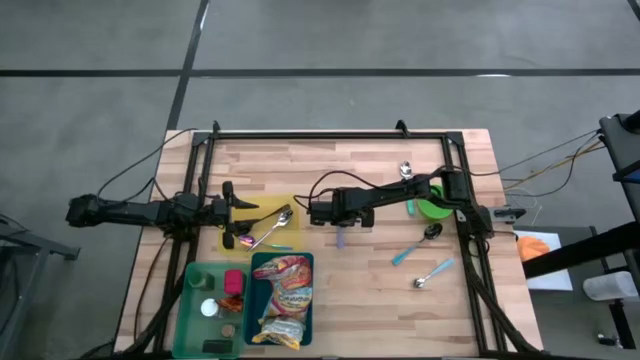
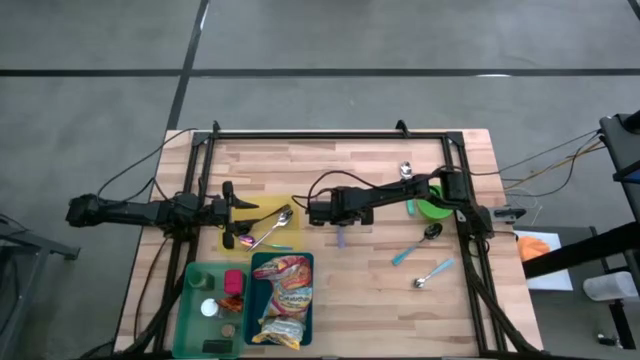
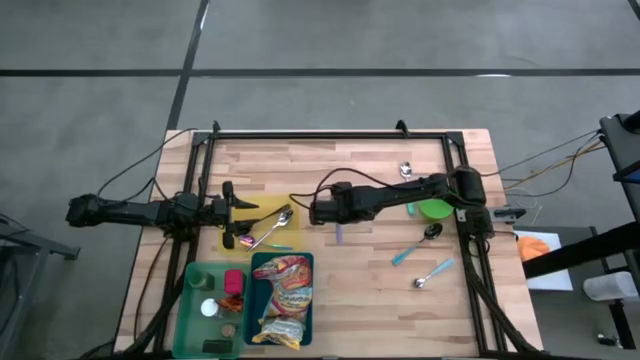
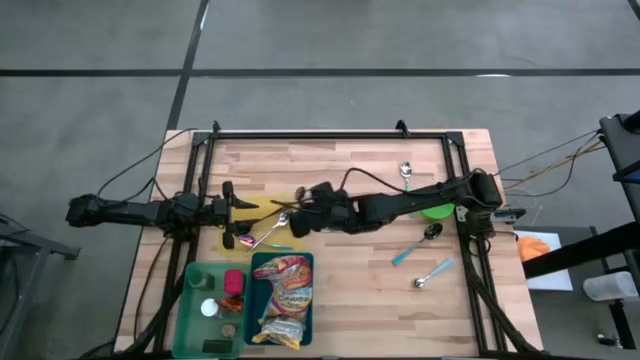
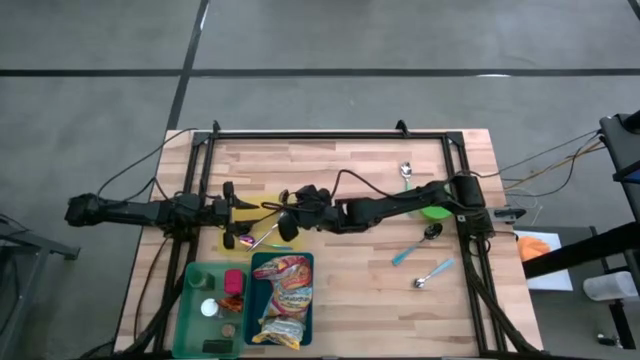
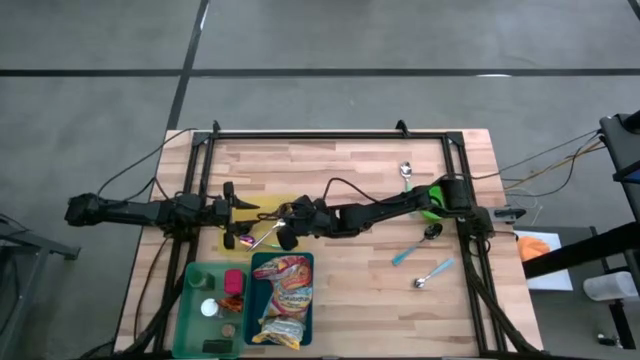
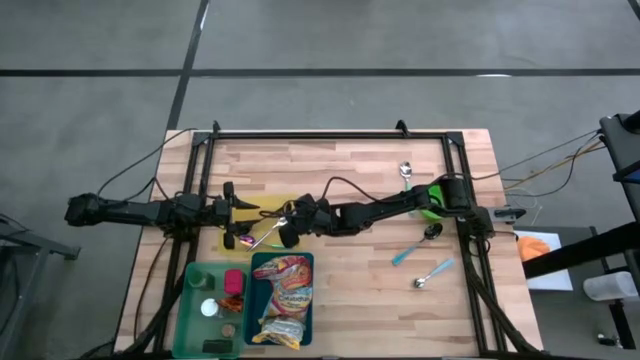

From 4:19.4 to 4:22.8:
Put the violet spoon into the yellow bin

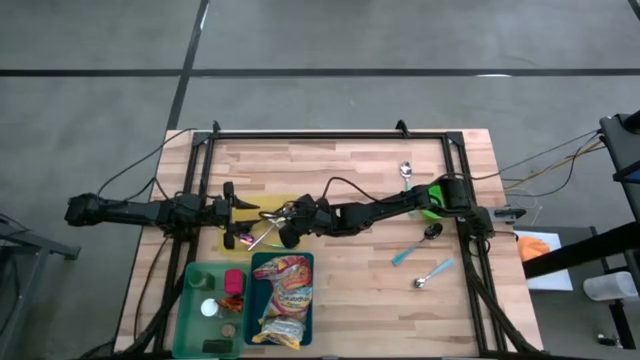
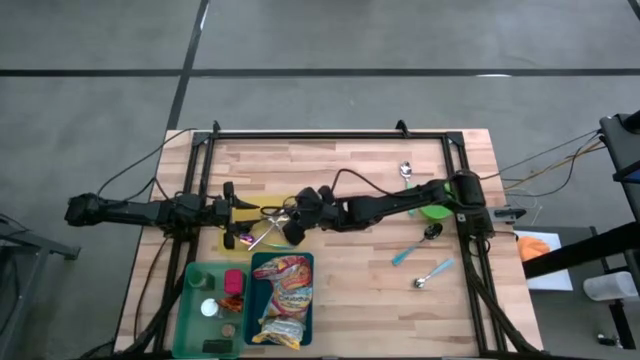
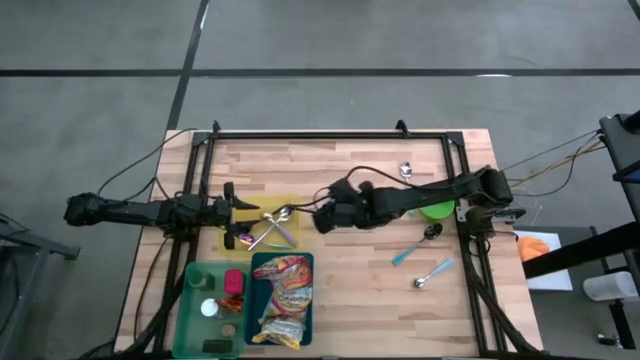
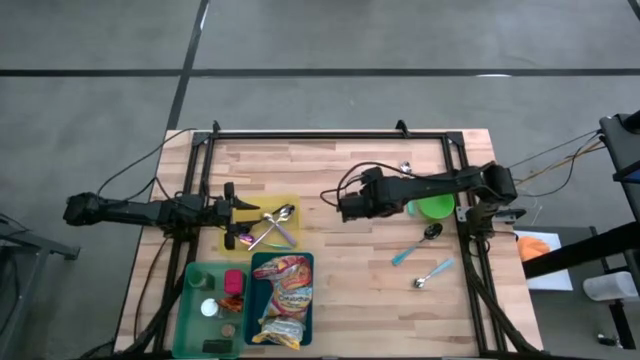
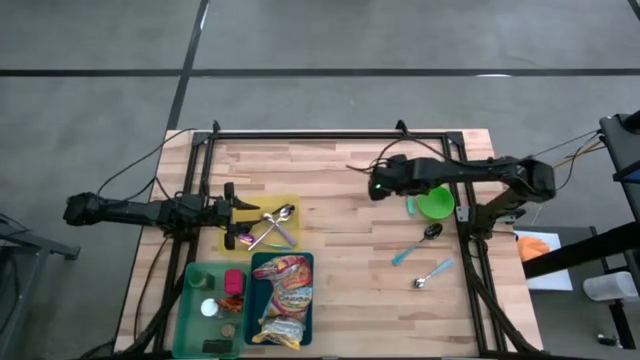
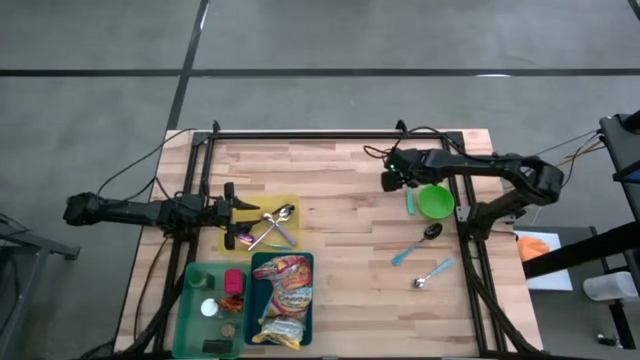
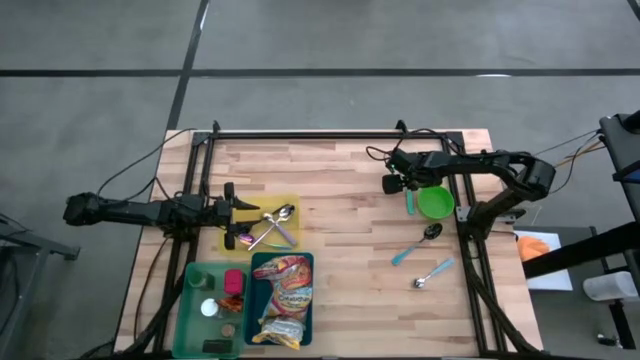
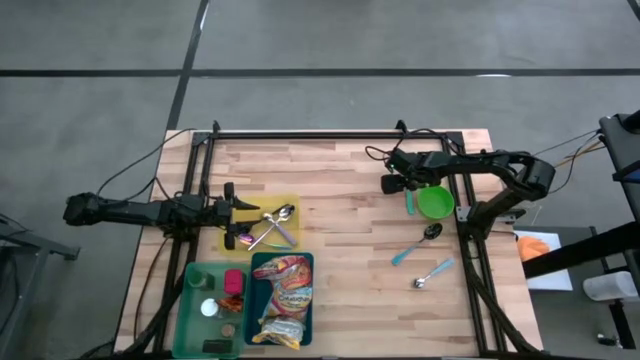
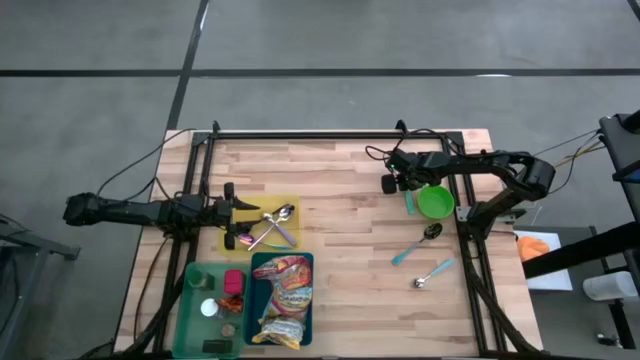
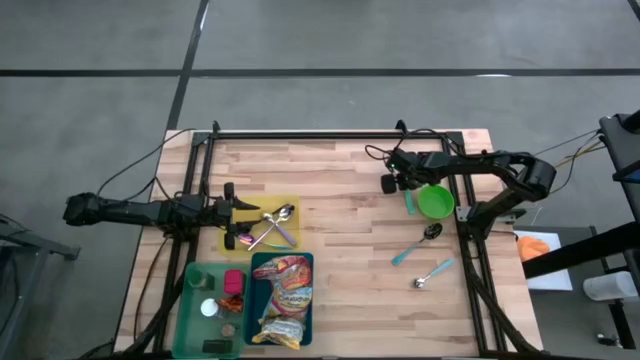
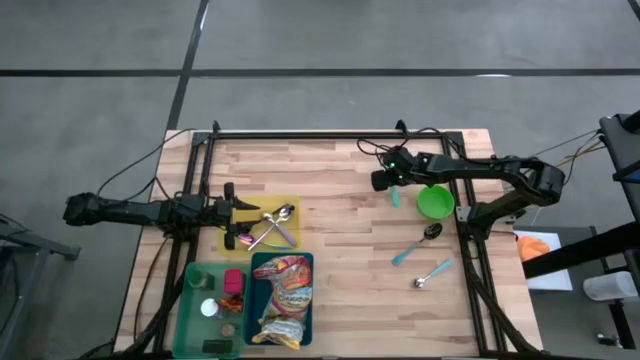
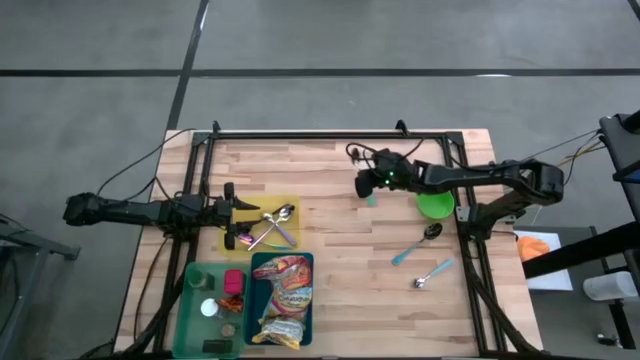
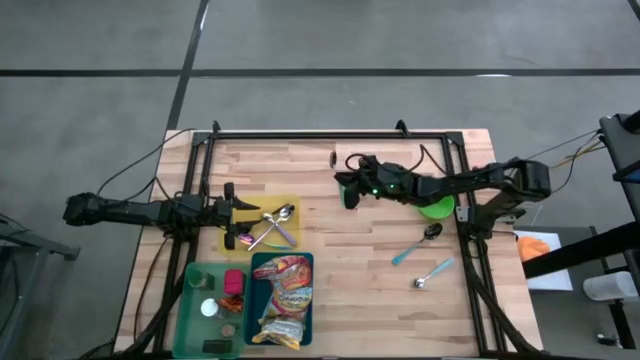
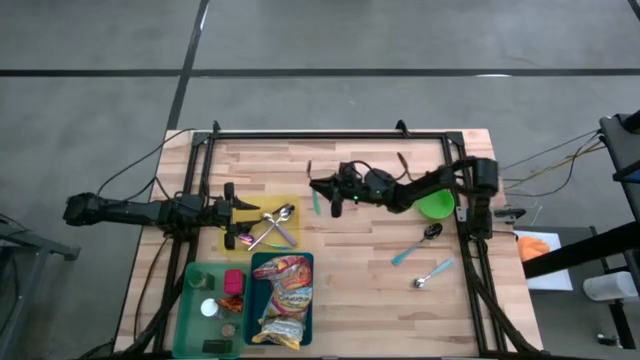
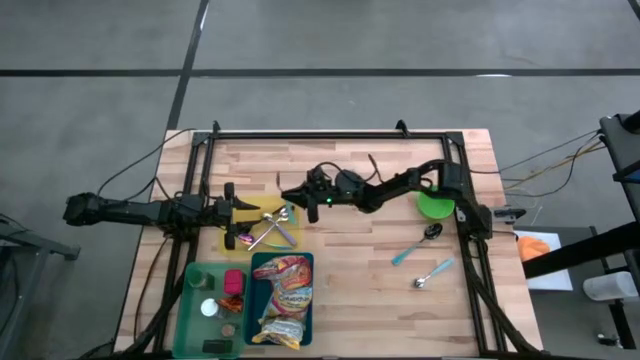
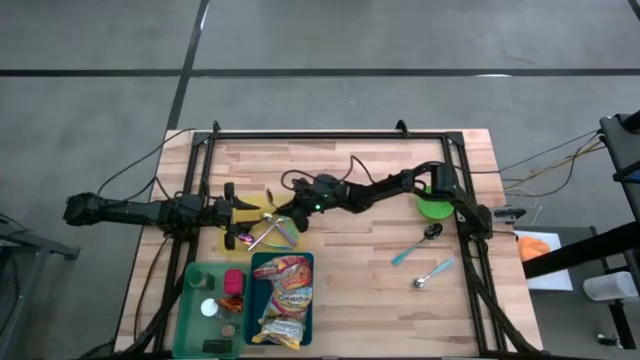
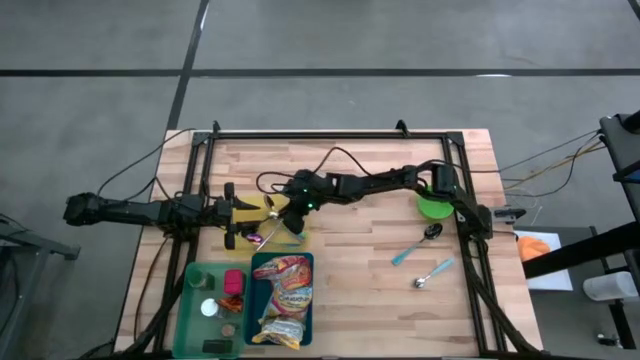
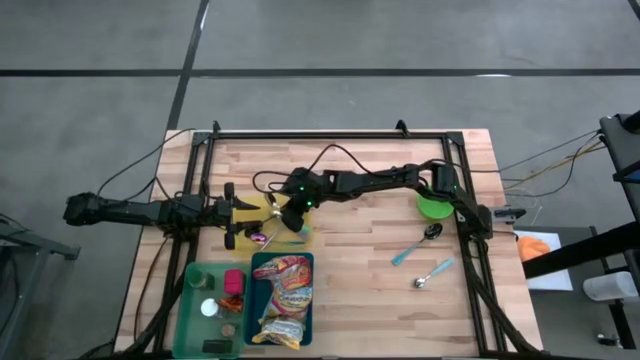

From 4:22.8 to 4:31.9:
Put the top light blue spoon into the yellow bin

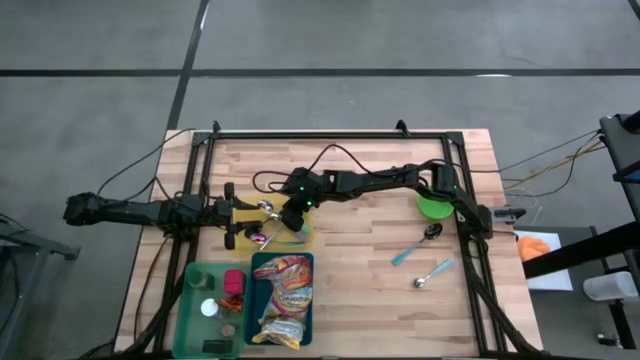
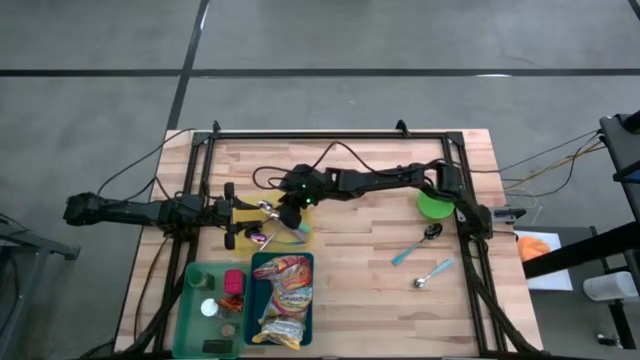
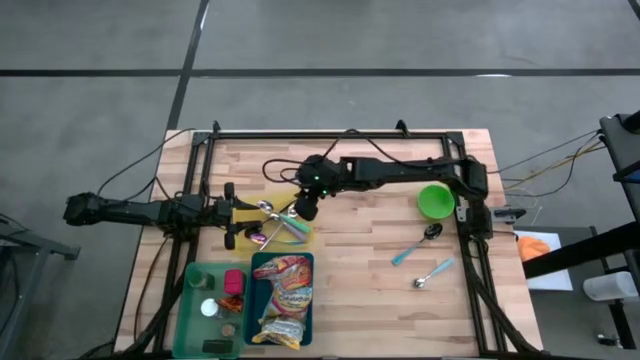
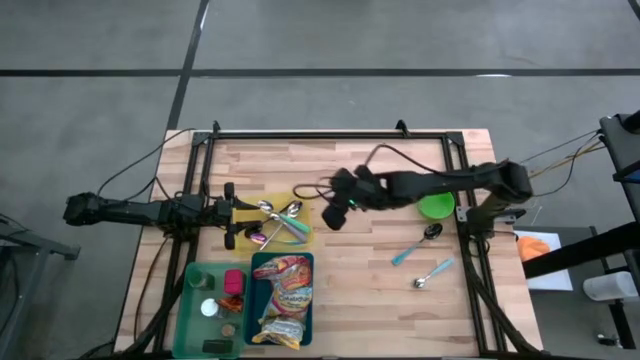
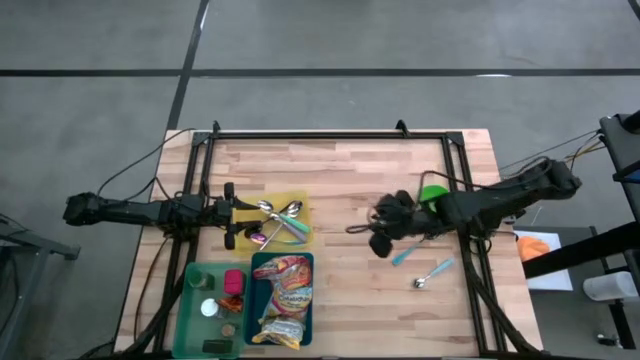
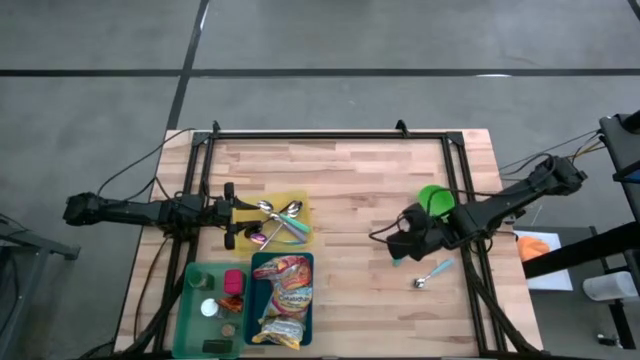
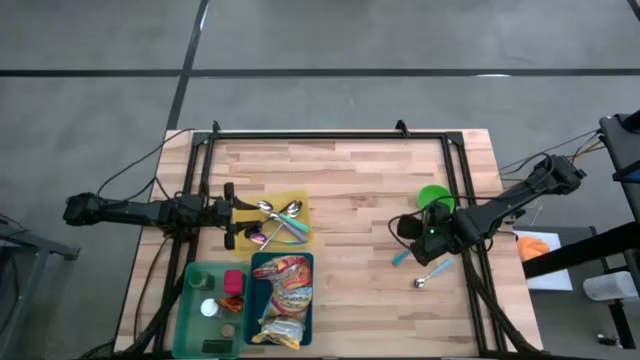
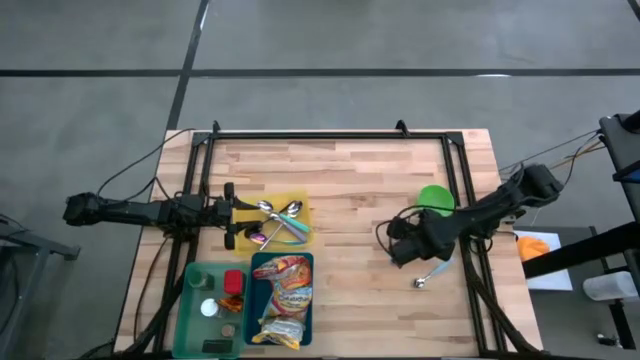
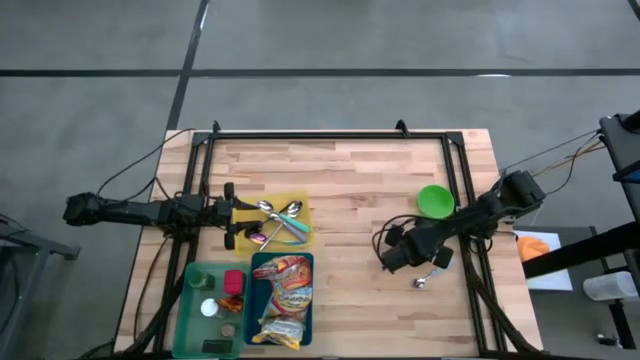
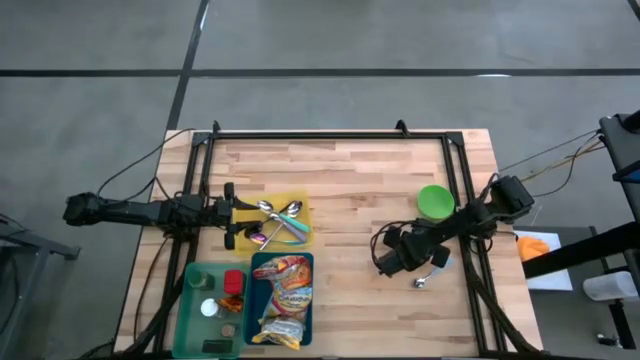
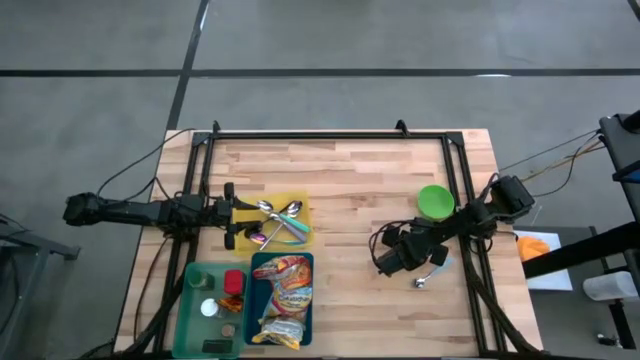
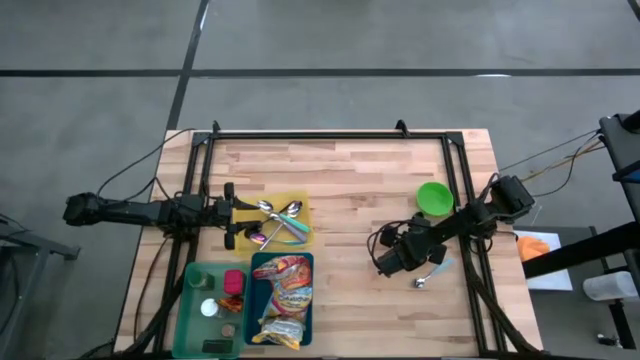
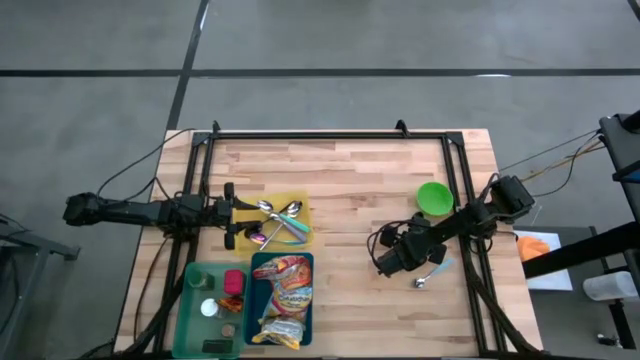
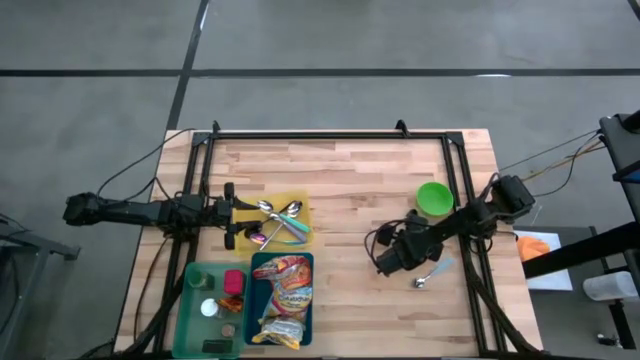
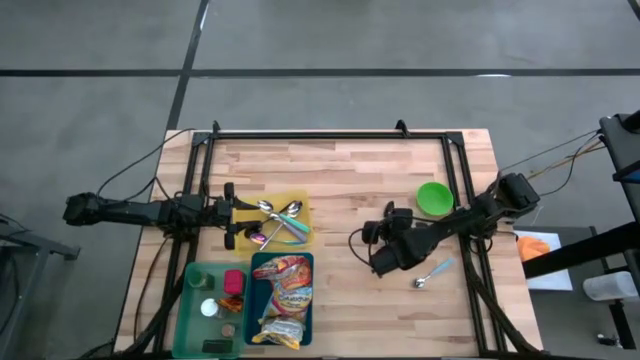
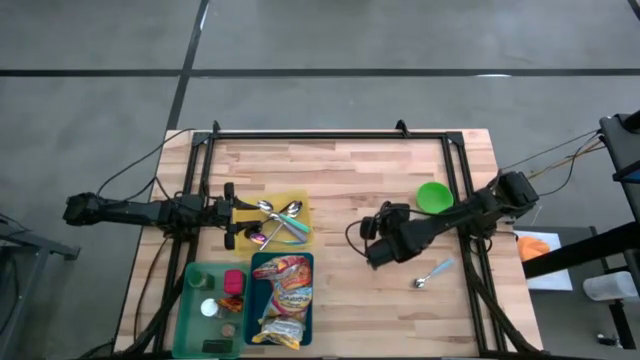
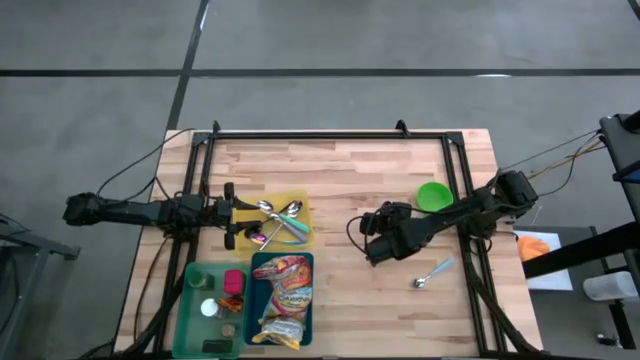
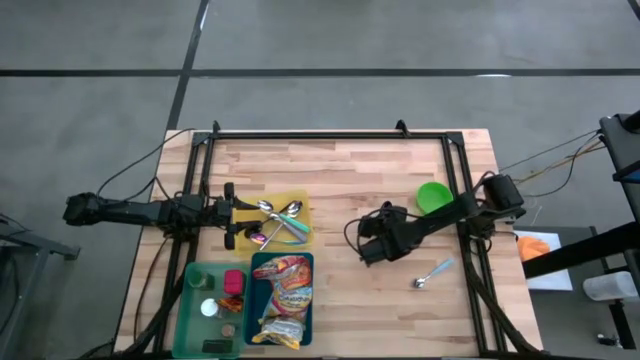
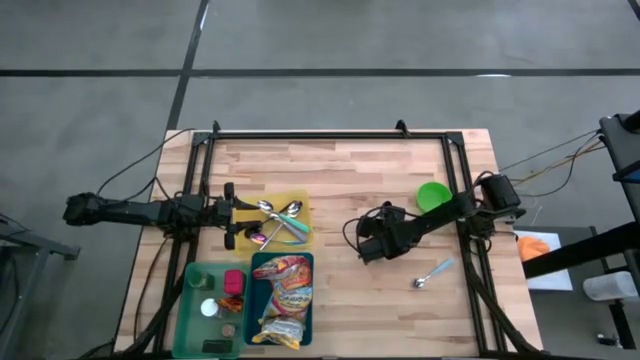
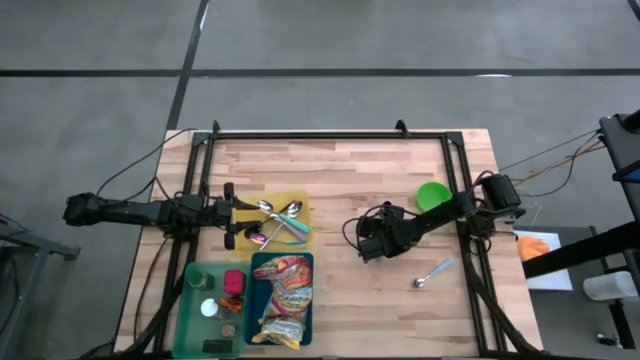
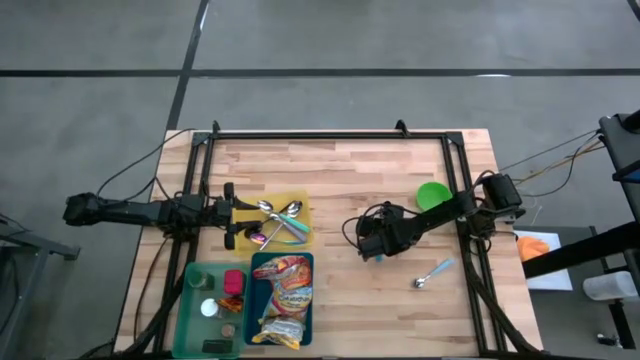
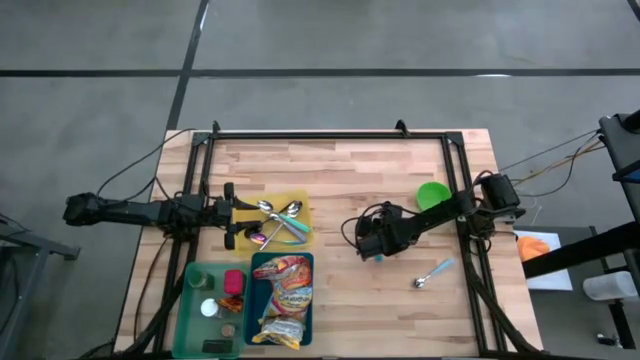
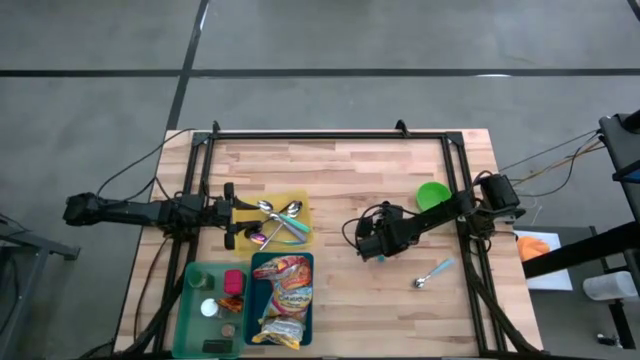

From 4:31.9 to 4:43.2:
Put the blue spoon into the yellow bin
